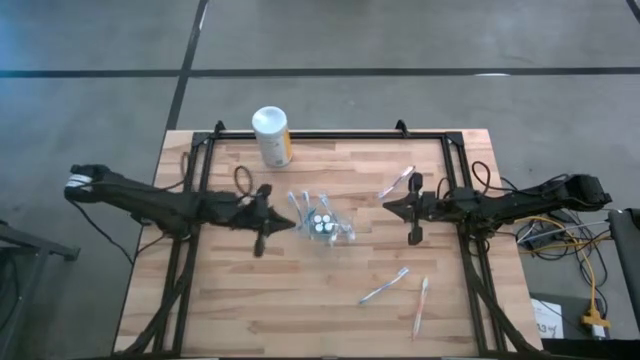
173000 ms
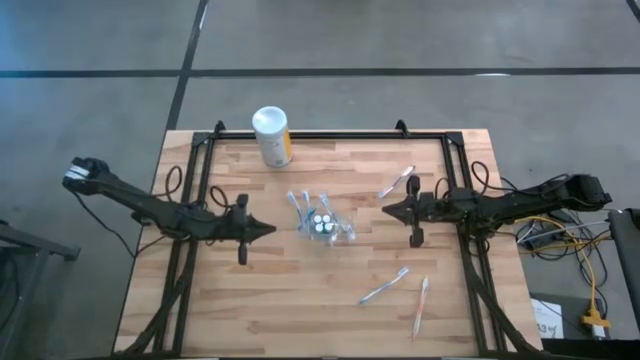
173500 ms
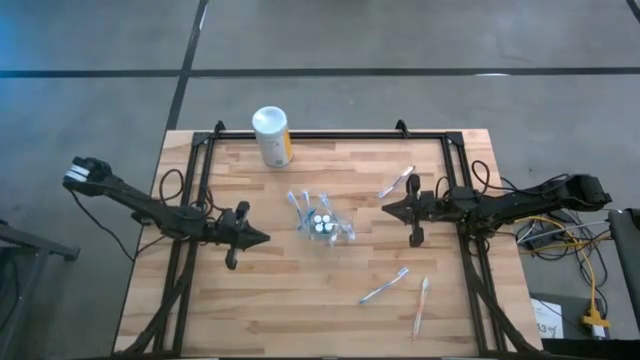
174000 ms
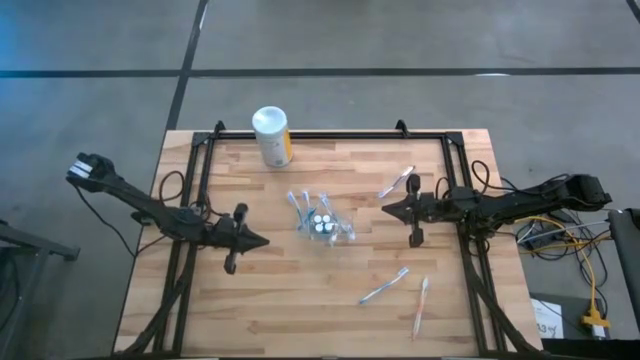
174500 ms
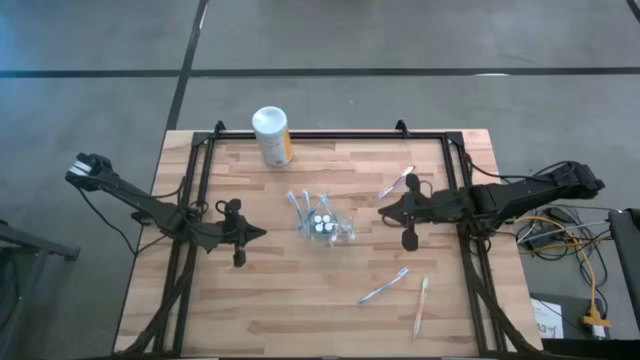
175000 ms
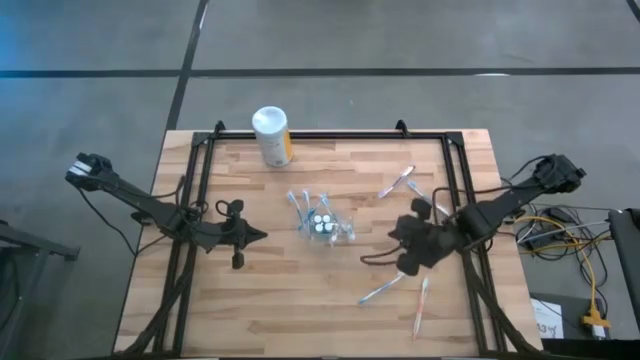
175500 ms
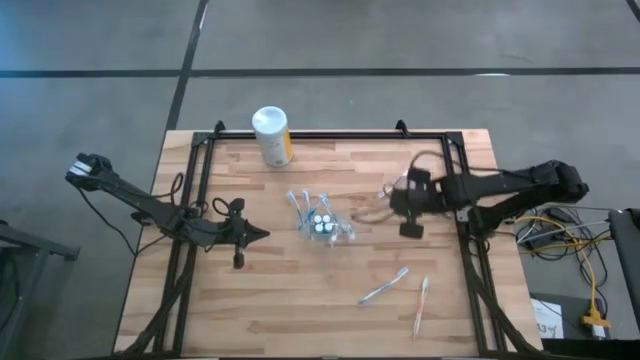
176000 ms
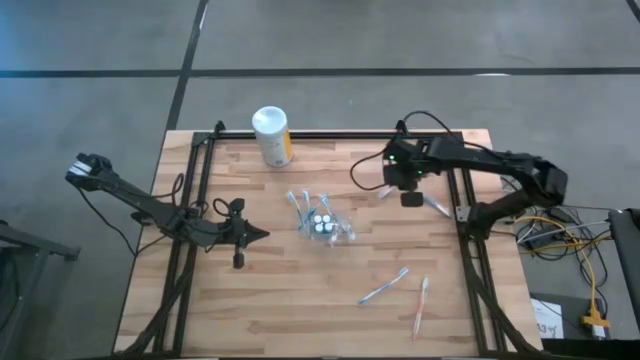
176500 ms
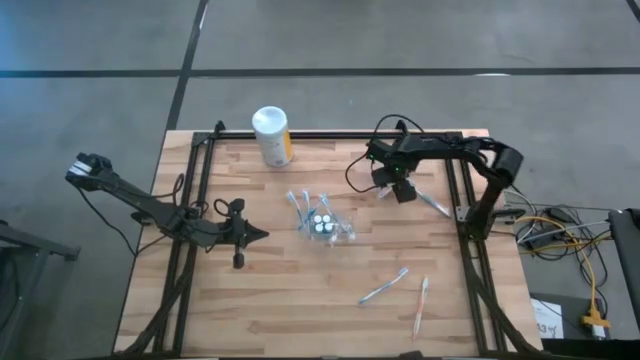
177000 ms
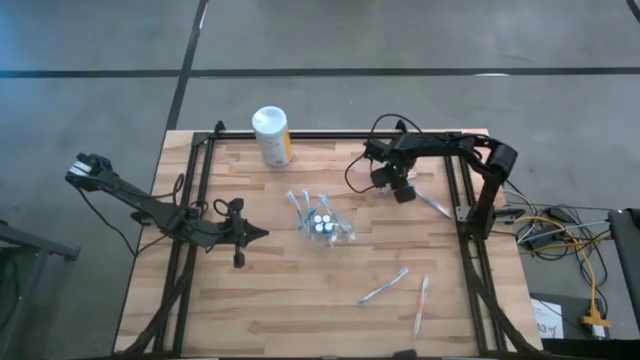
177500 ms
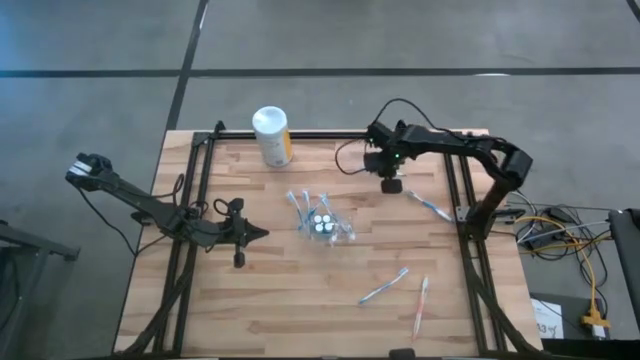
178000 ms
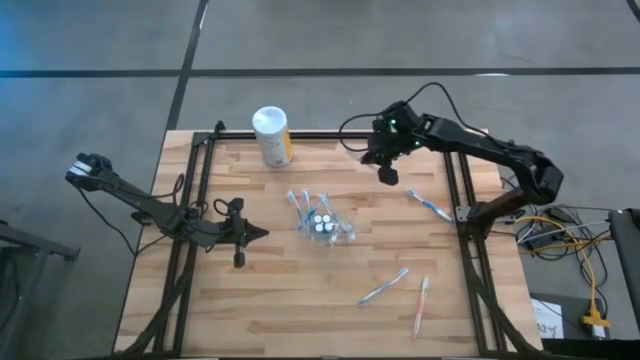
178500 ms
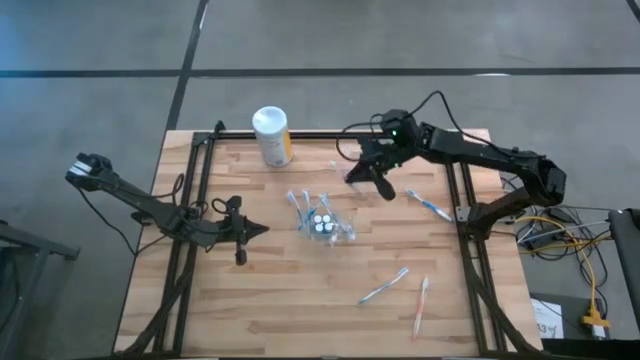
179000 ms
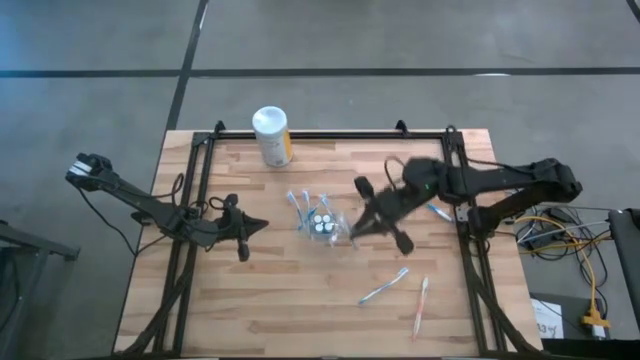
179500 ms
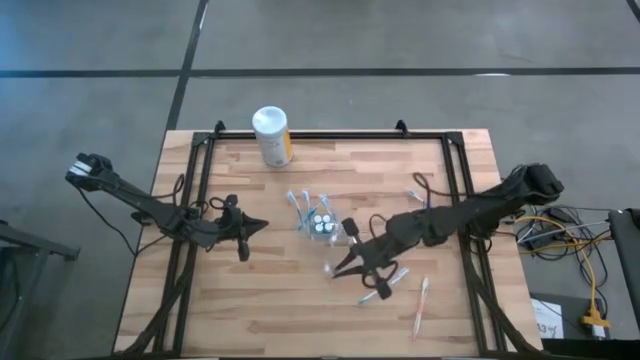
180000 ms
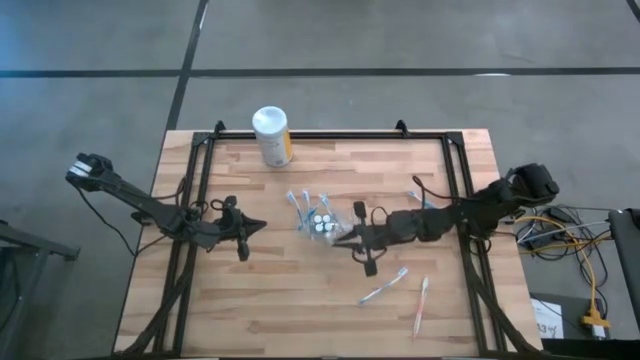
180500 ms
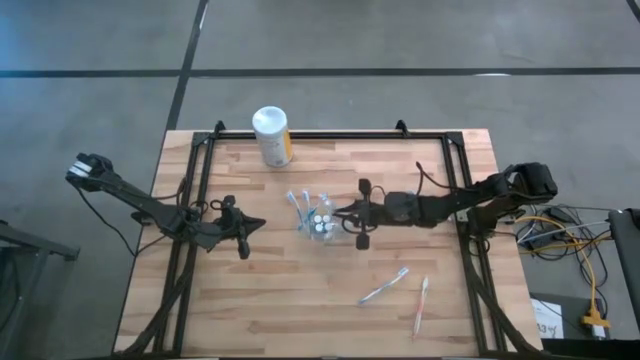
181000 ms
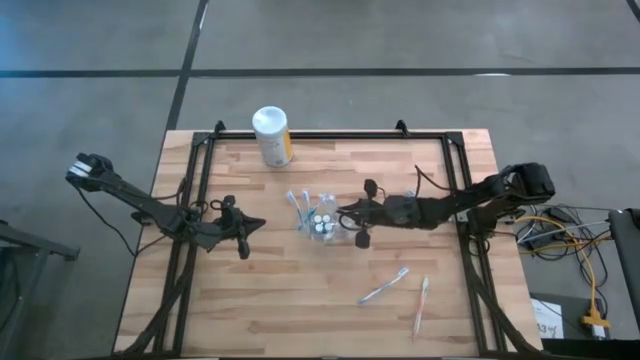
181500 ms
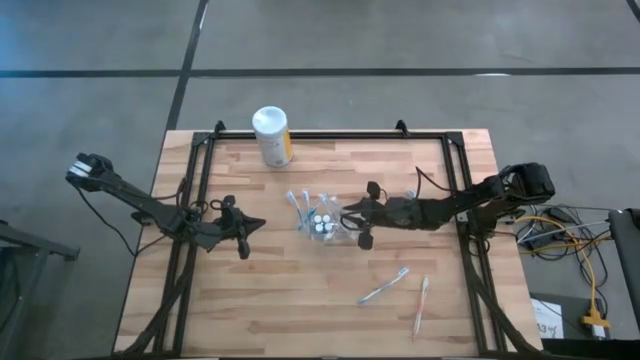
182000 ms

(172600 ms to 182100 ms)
Task: Pick & Place toothbrushing station
Put the purple toothbrush into the transparent organizer

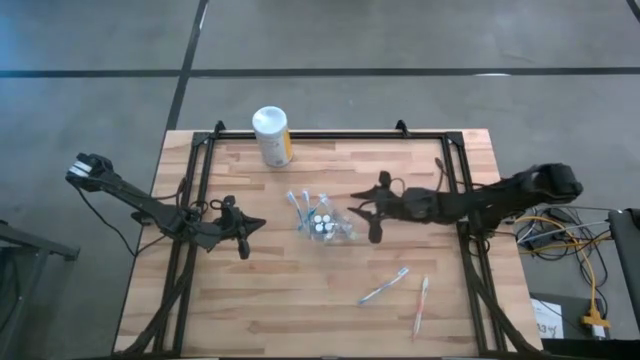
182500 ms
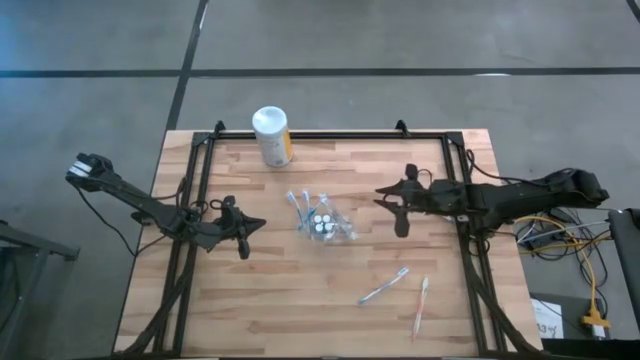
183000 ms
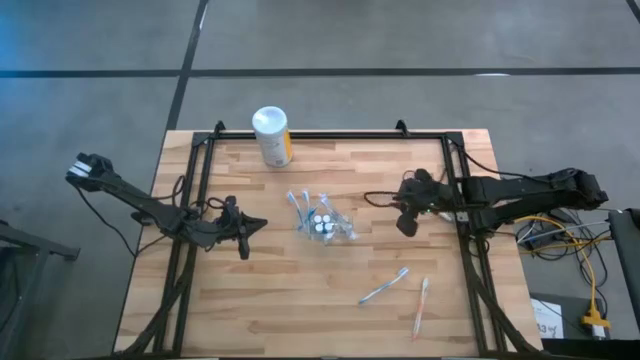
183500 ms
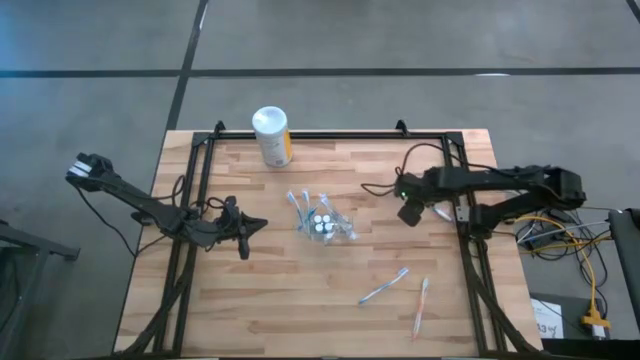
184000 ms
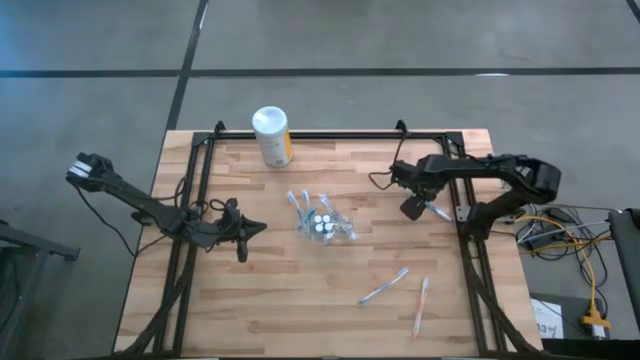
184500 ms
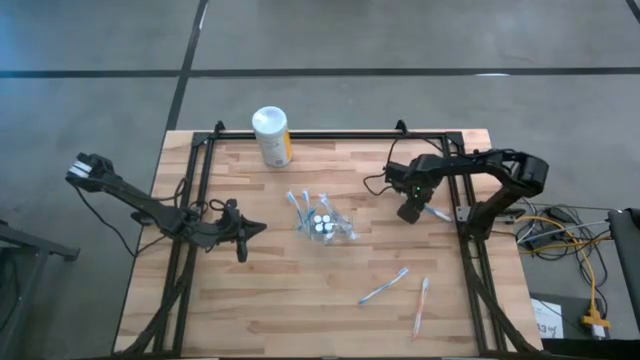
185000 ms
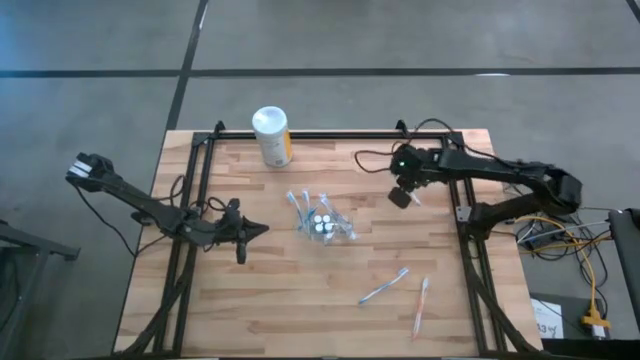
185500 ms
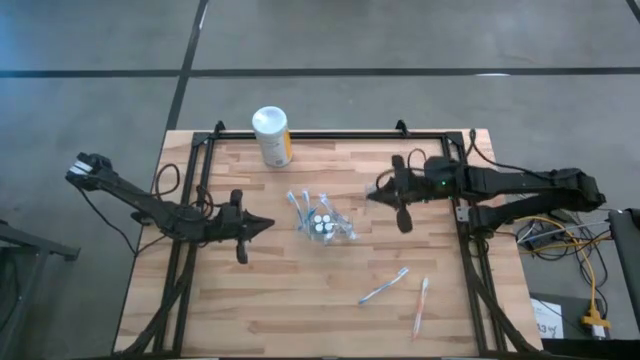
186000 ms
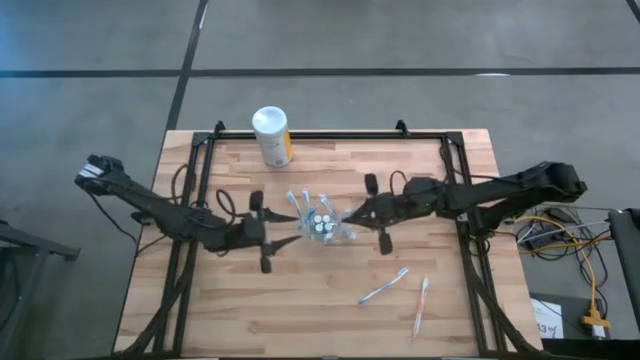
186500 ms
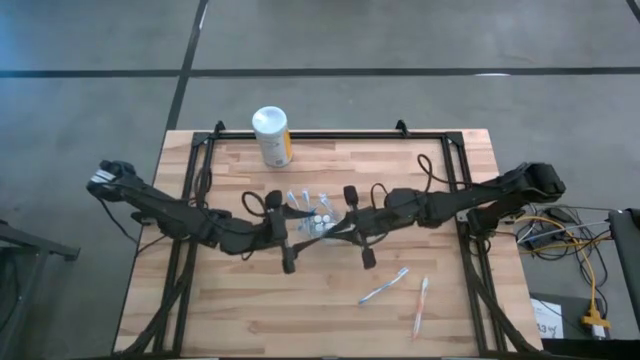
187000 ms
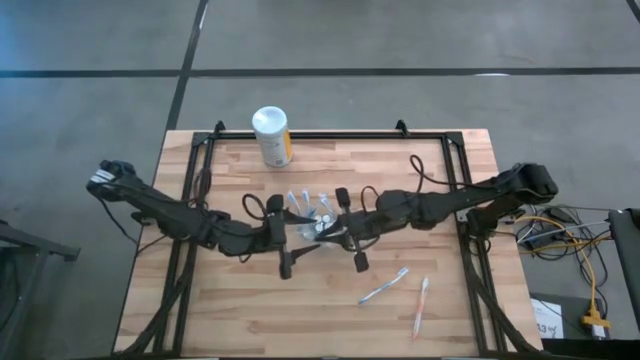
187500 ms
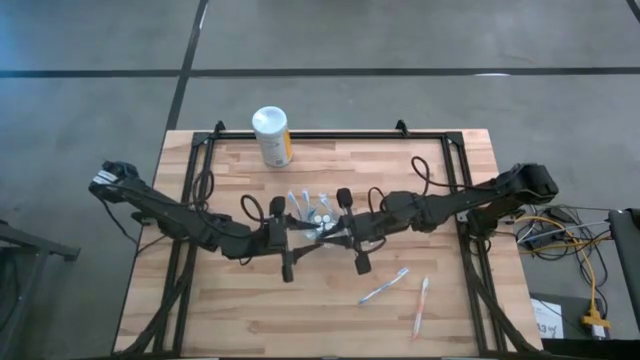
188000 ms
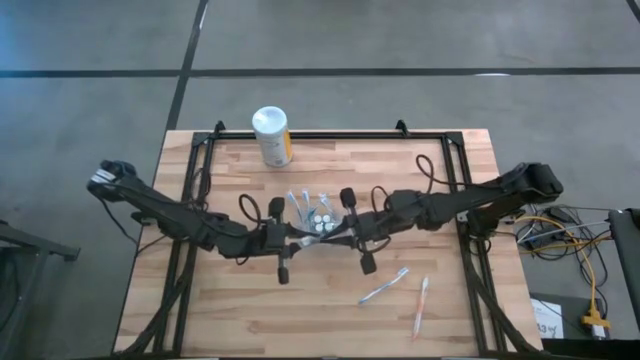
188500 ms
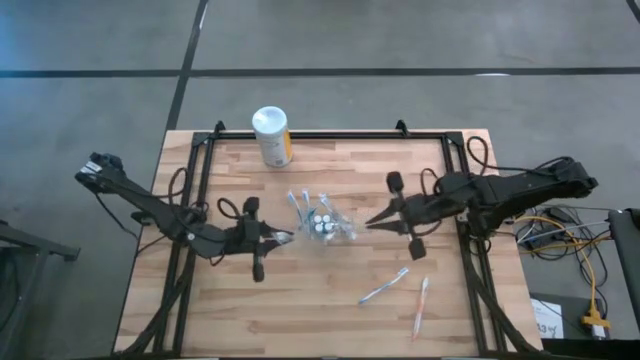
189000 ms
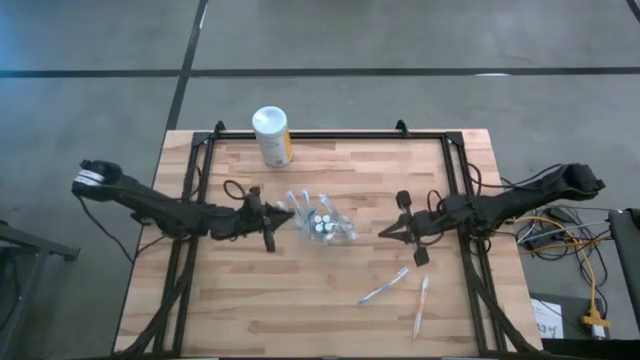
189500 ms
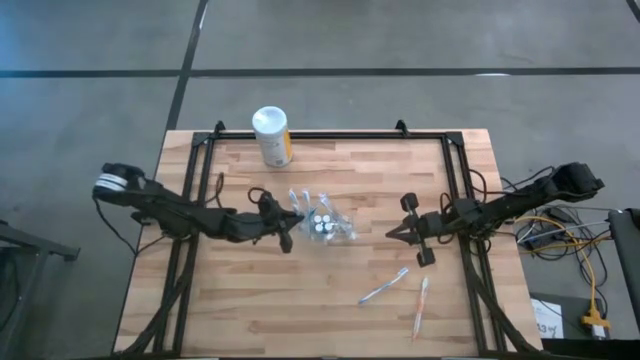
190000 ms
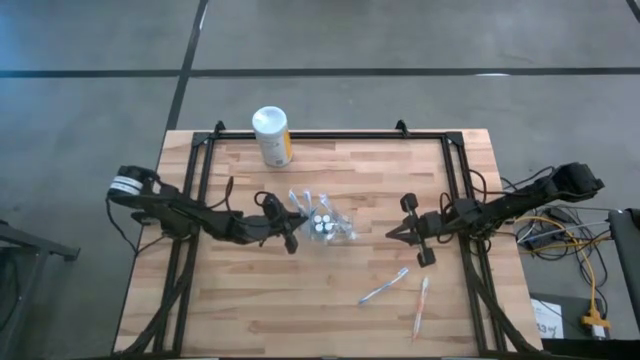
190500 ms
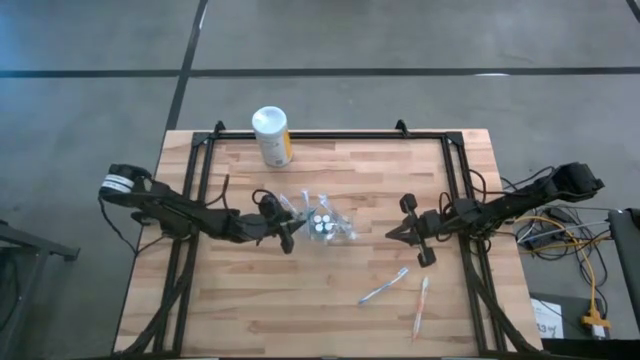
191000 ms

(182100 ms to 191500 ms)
Put the blue toothbrush into the transparent organizer

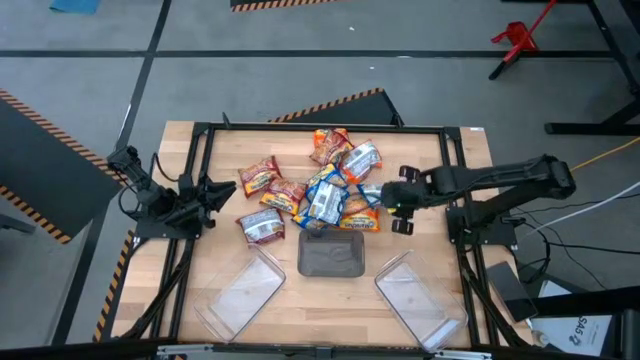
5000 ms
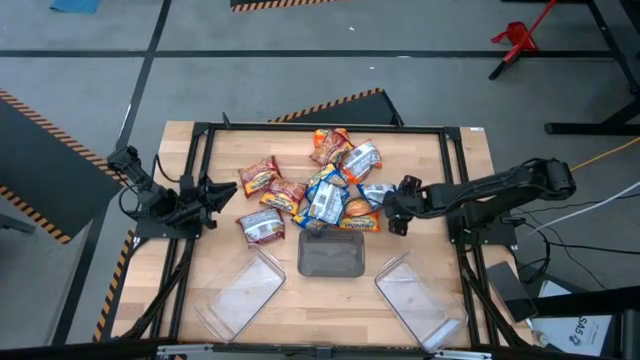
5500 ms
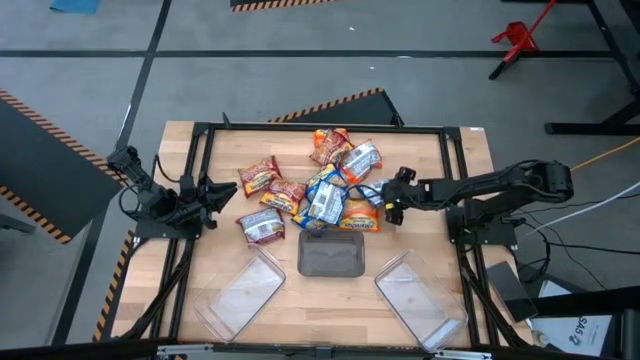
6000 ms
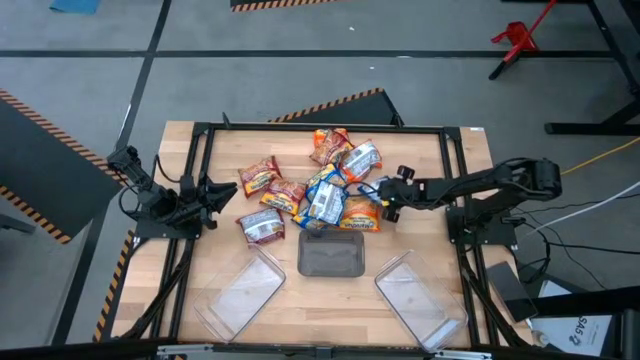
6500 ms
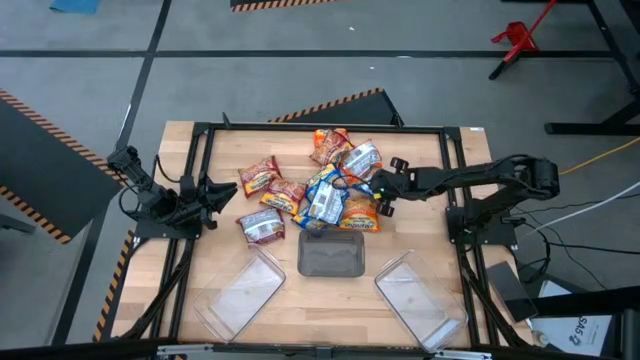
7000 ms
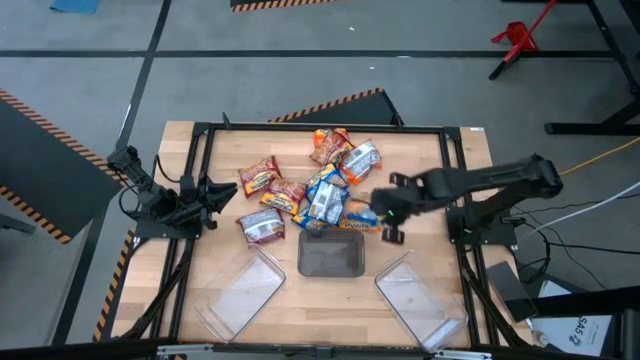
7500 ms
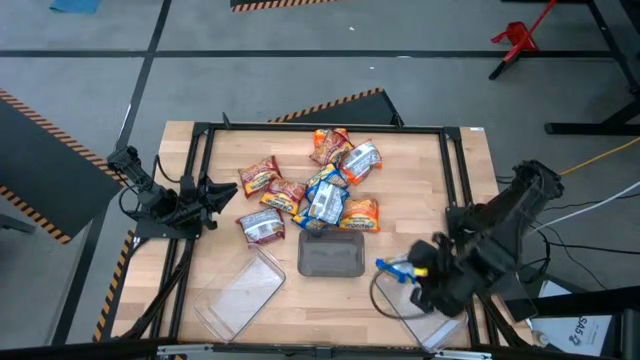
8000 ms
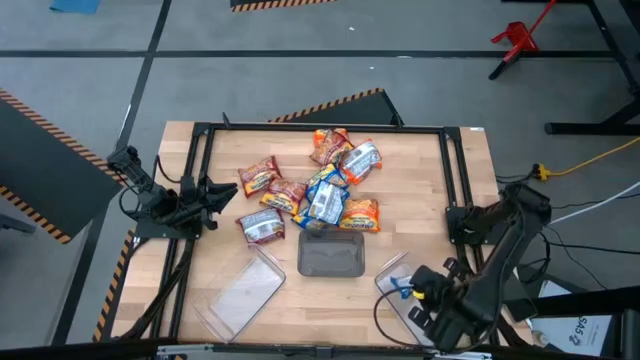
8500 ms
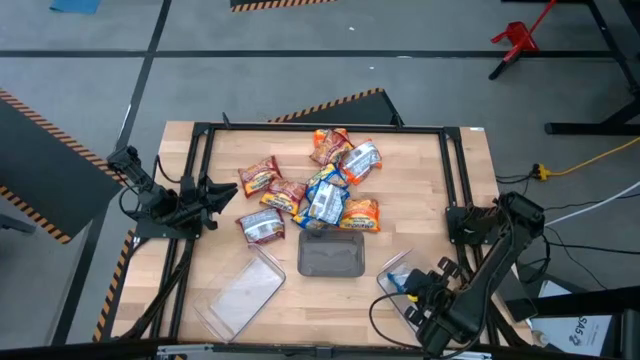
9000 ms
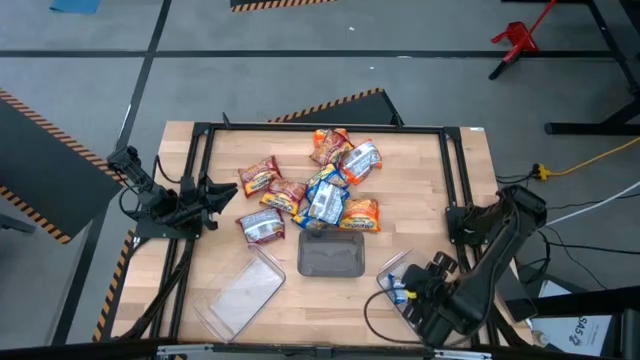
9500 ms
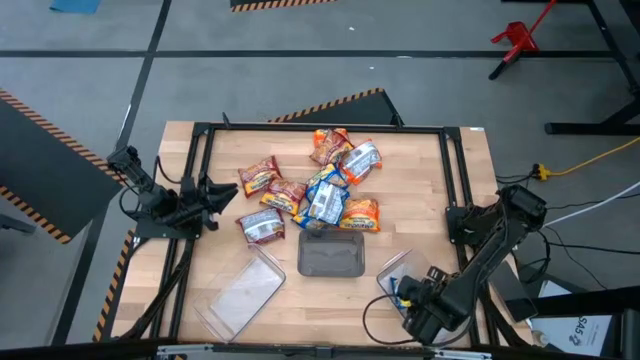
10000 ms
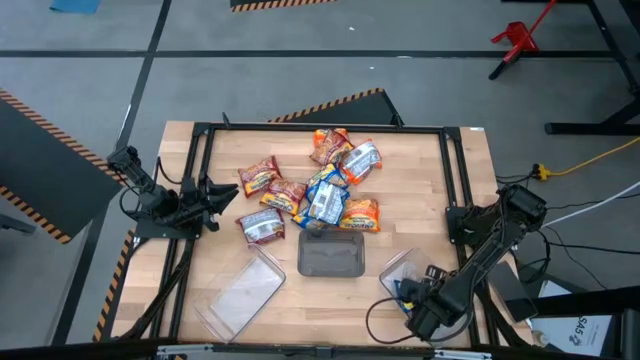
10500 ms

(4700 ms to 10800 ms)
Task: Sort Maruchan noodles
Put the blue noodle pack into the right transparent bin
